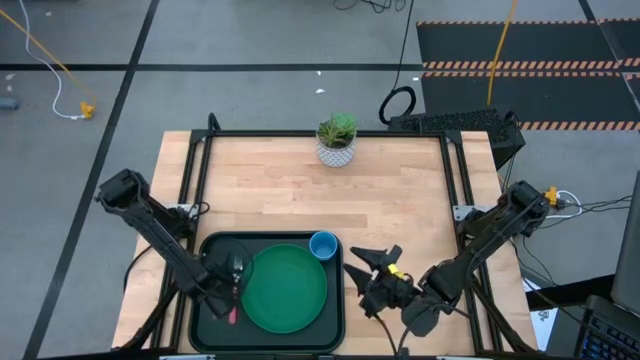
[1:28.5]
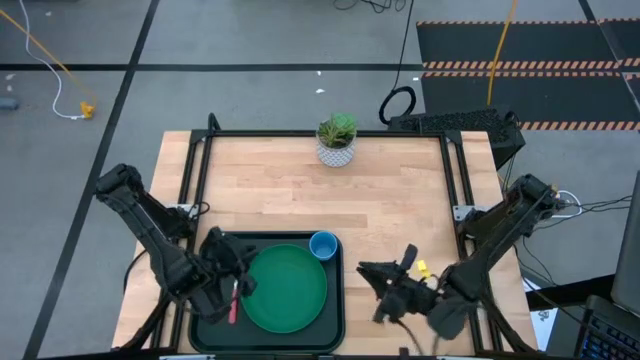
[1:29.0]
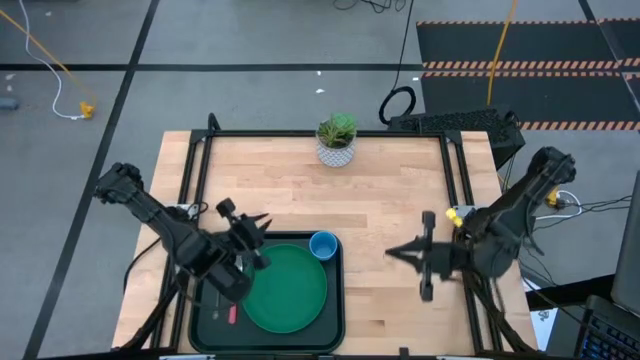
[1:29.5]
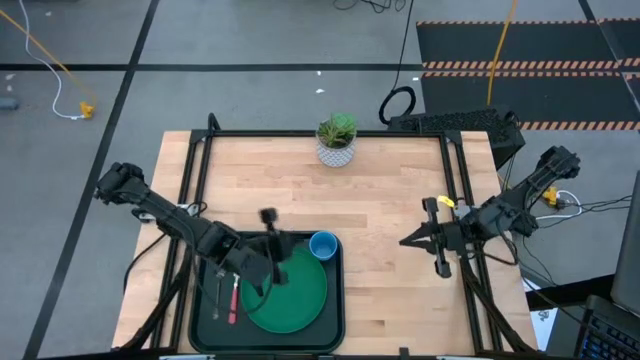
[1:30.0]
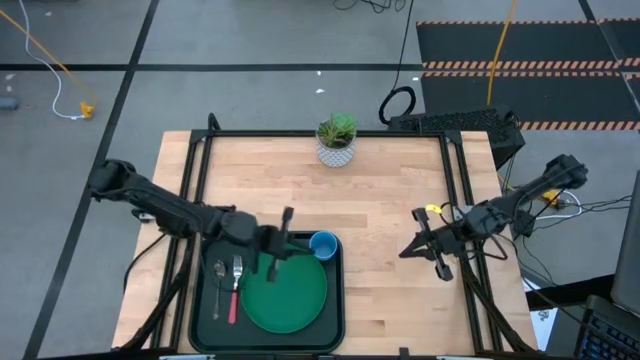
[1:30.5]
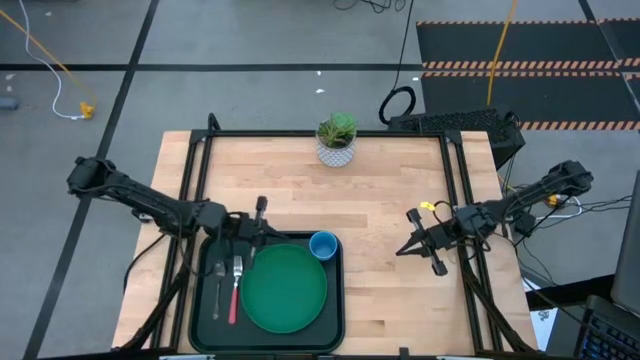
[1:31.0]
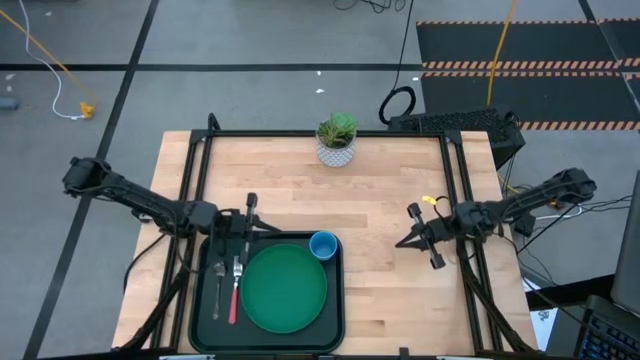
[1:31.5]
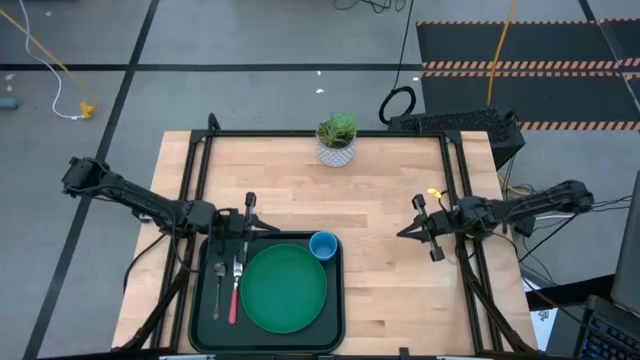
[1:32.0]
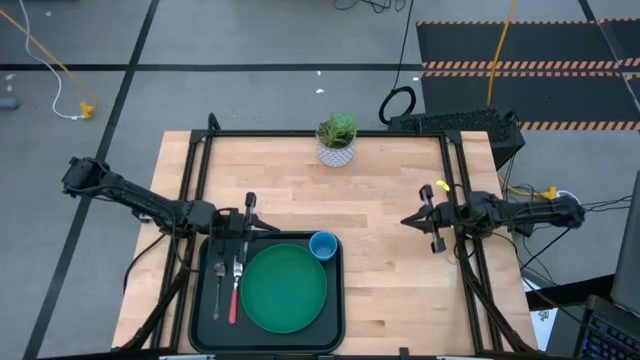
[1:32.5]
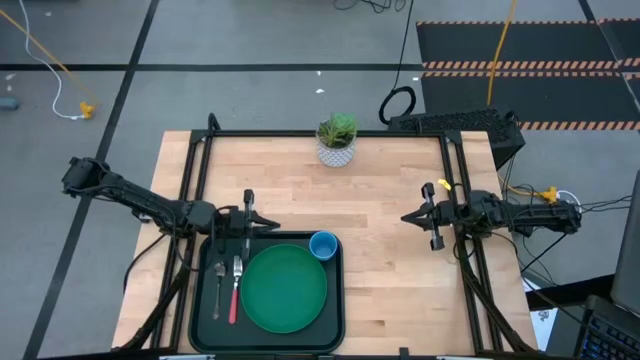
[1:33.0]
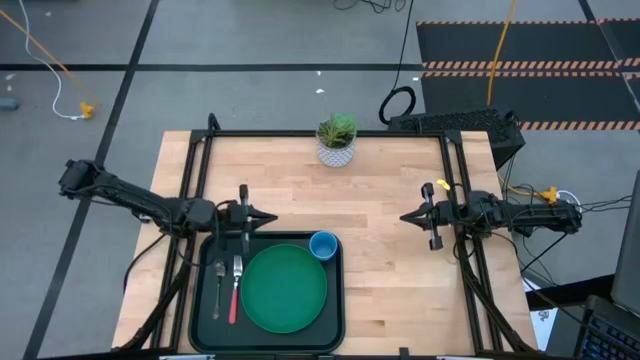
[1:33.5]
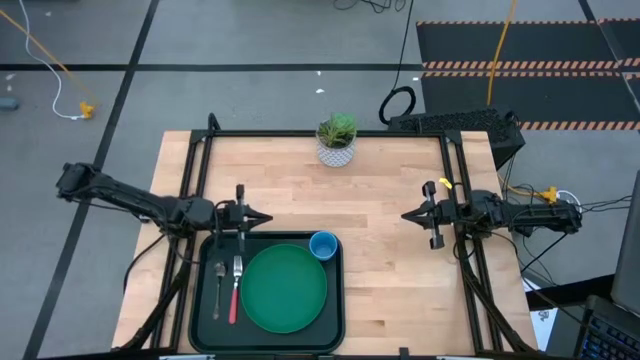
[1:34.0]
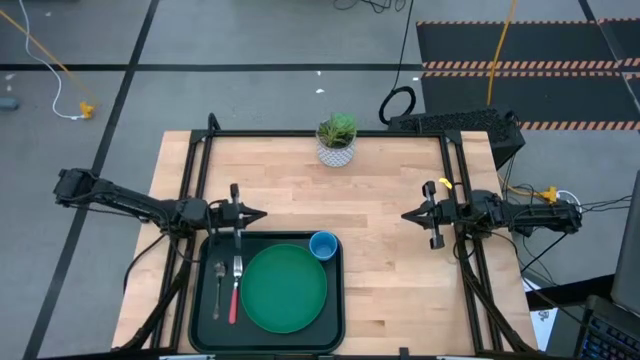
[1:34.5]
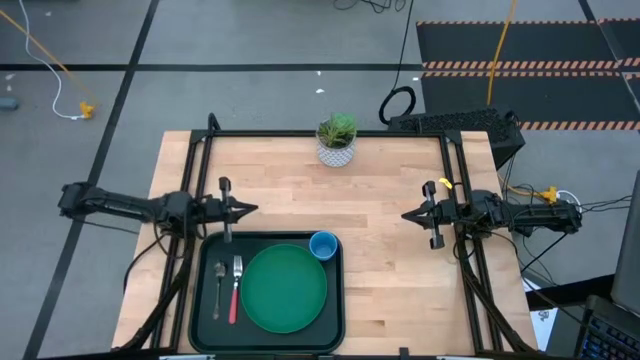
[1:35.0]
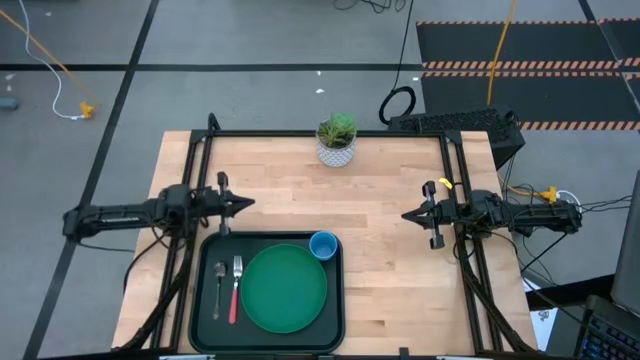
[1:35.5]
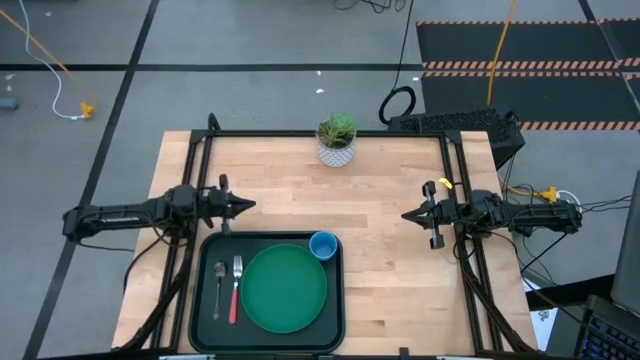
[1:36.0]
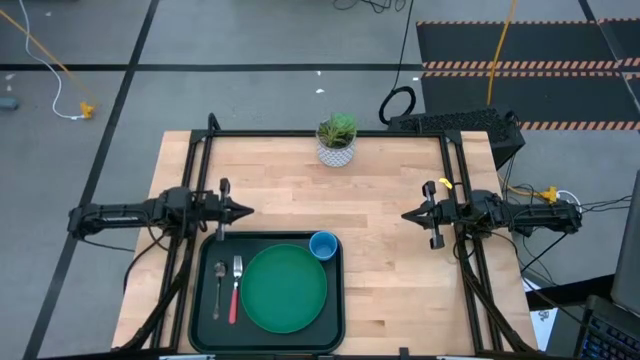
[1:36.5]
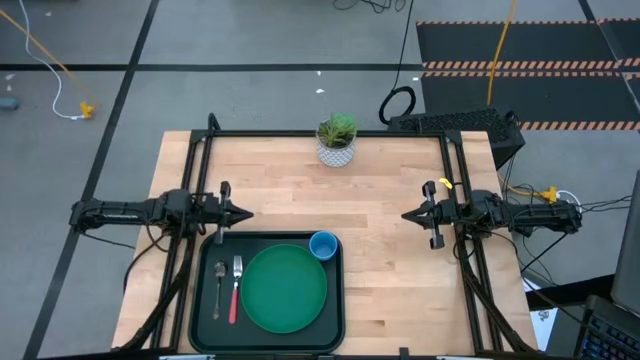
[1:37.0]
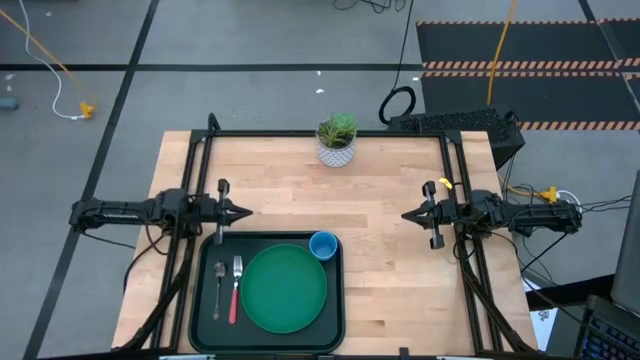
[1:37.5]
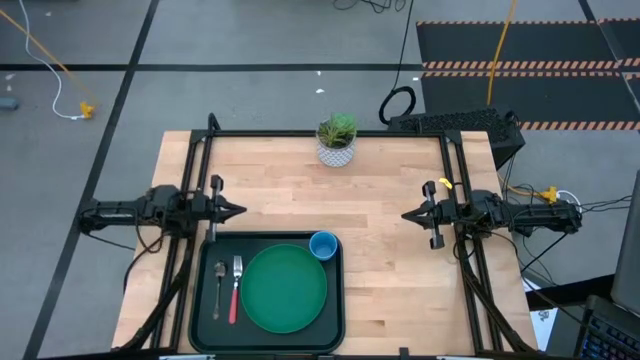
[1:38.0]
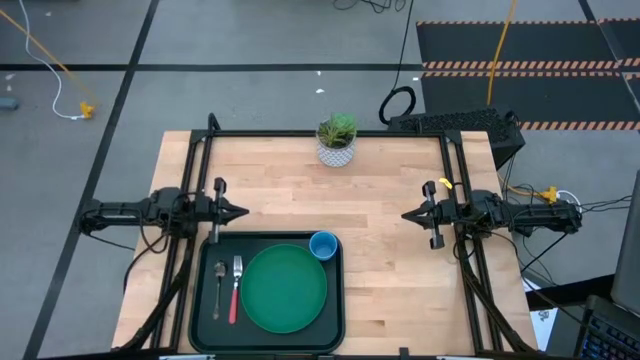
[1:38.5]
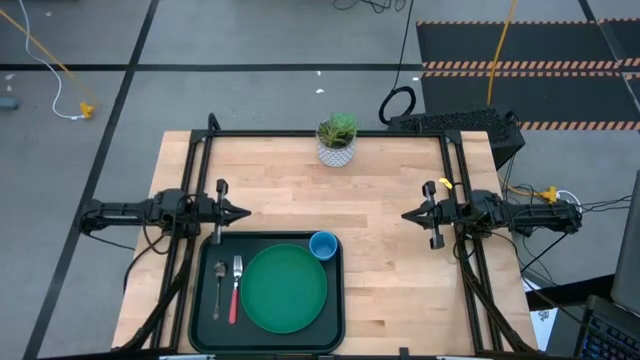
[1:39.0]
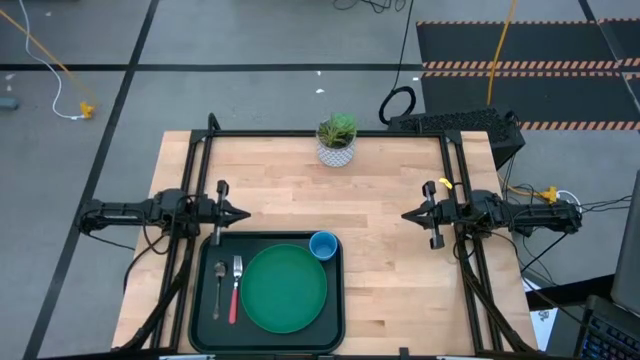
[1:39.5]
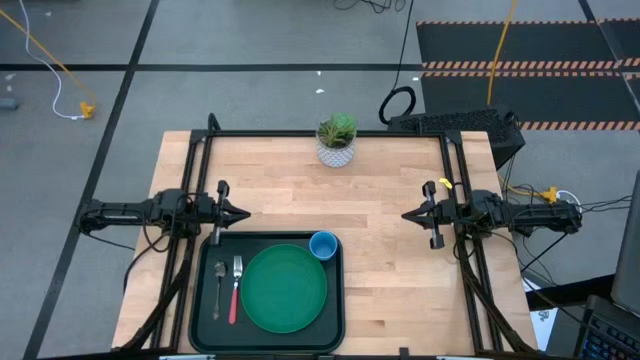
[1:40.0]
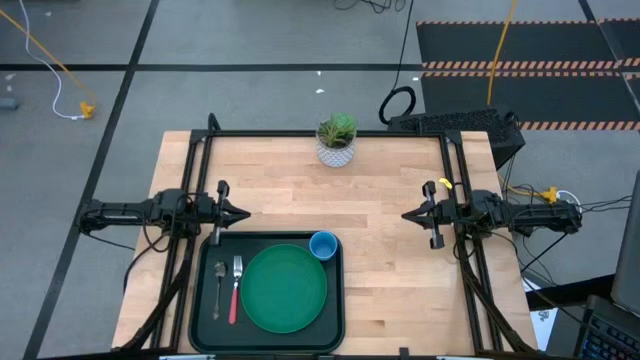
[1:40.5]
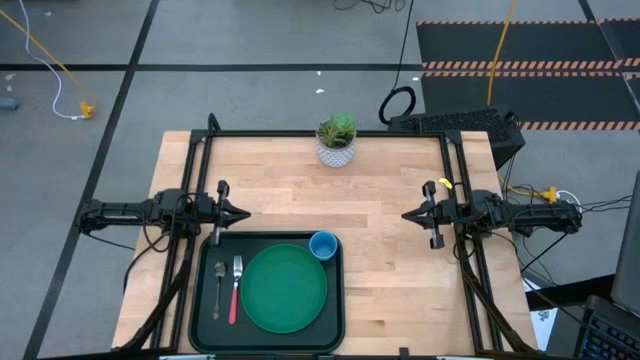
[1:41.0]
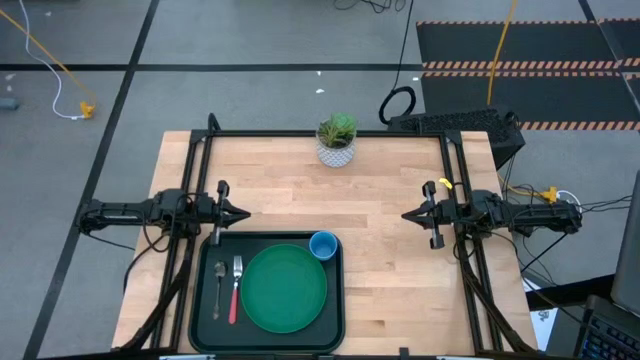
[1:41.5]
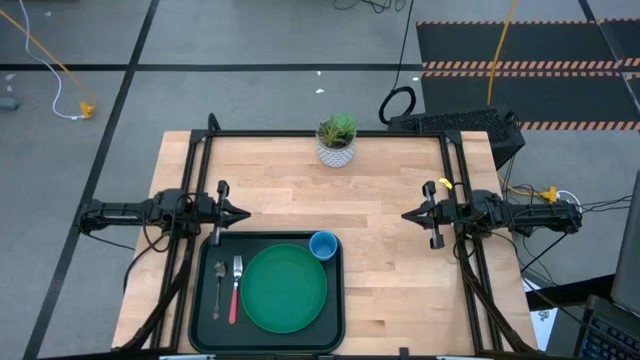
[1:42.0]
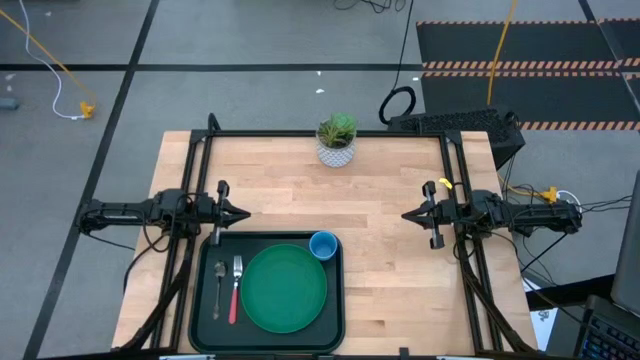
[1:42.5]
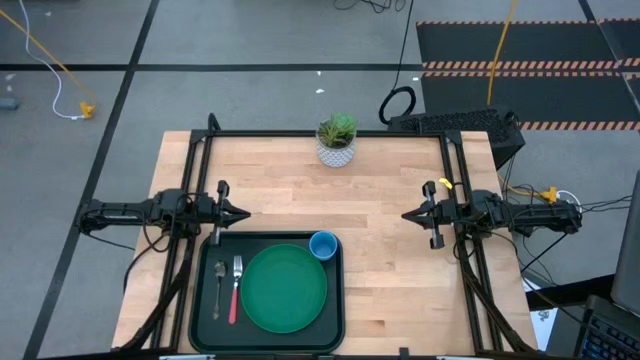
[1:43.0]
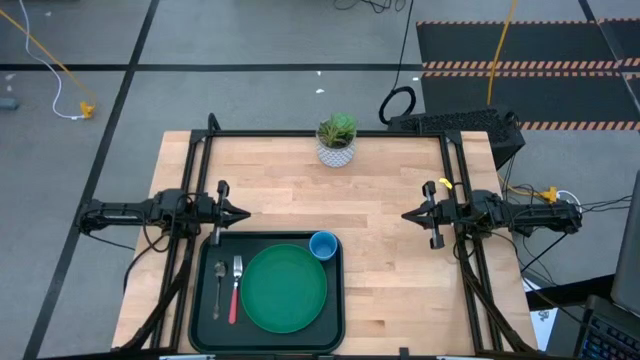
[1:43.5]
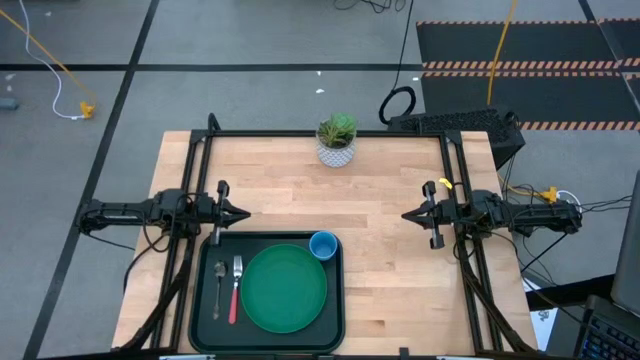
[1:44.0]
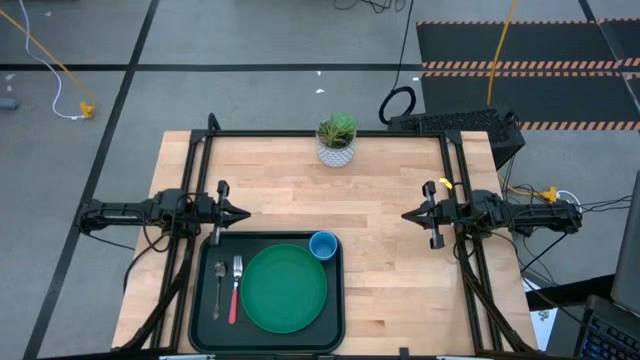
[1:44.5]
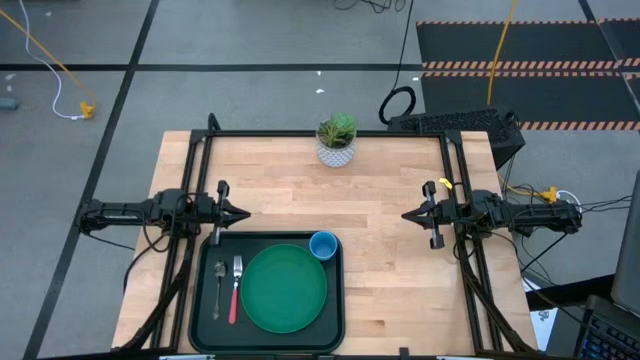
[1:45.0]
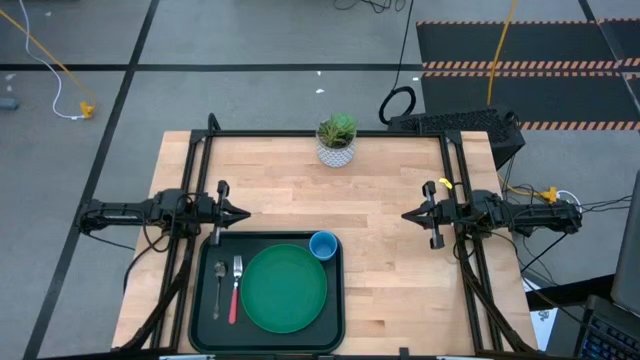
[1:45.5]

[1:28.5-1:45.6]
Task: Pick and place plate/cup/fork/spoon on tray
Return to Home Position

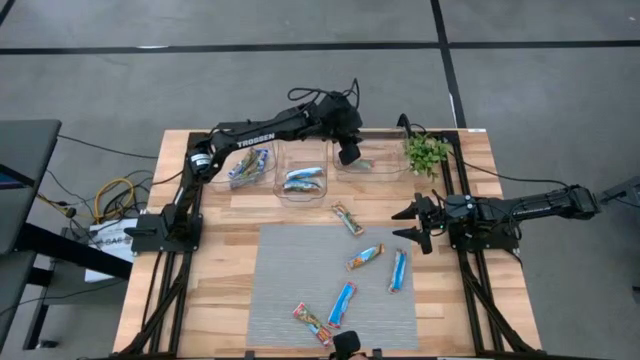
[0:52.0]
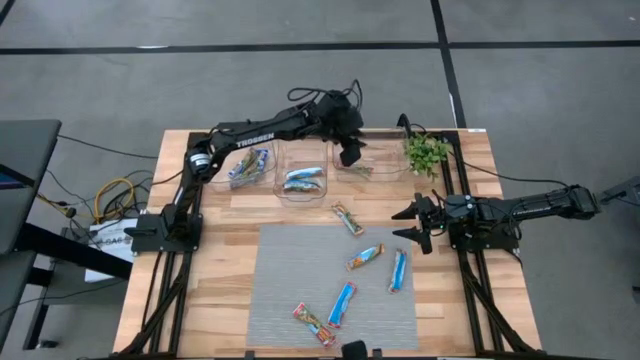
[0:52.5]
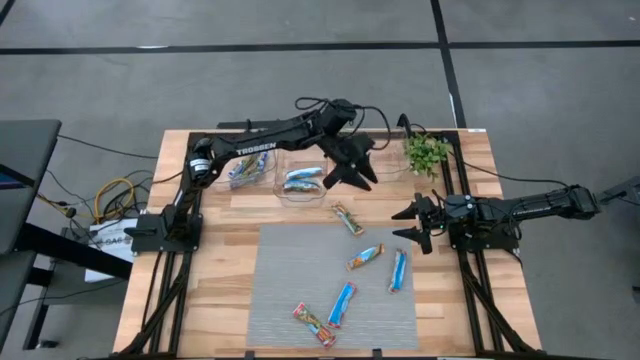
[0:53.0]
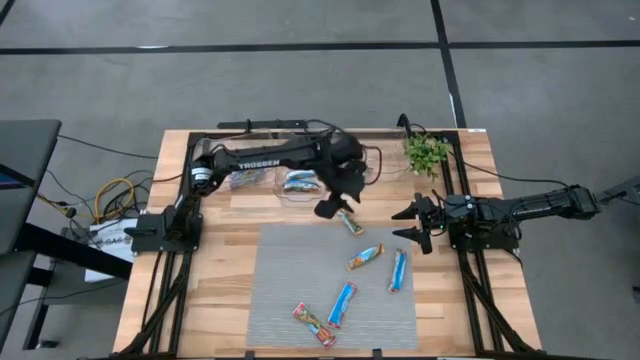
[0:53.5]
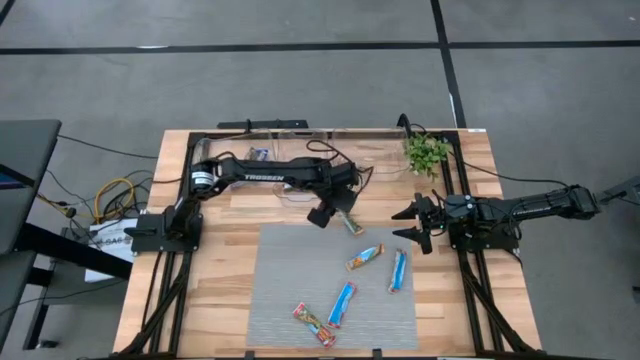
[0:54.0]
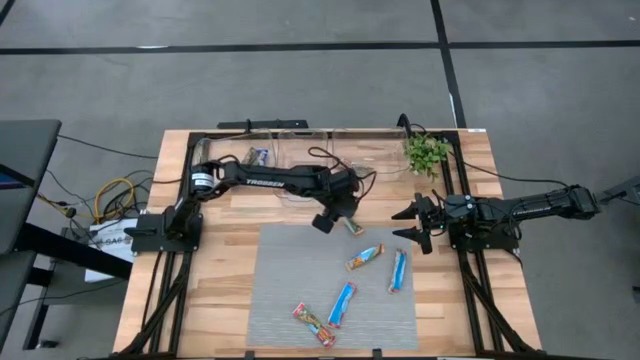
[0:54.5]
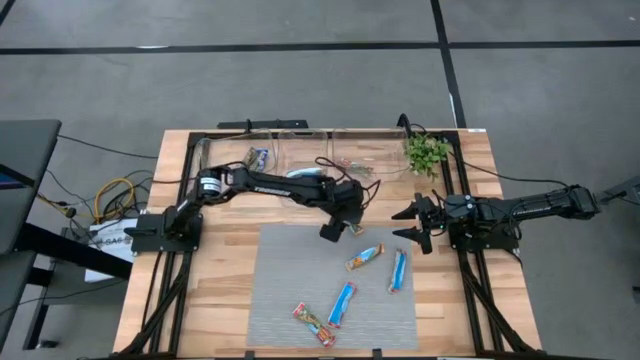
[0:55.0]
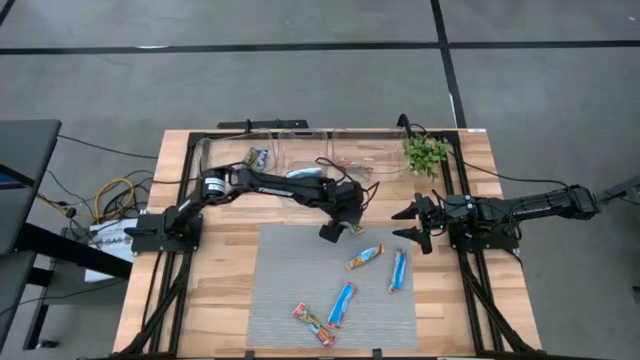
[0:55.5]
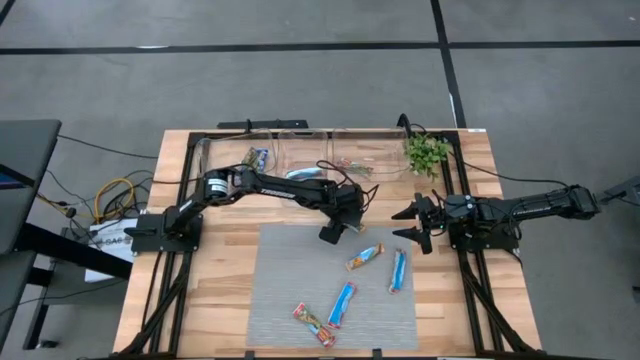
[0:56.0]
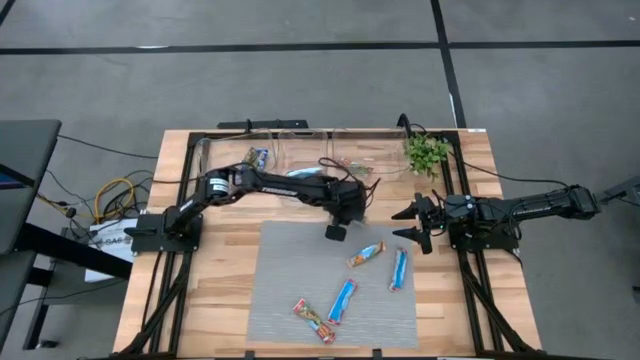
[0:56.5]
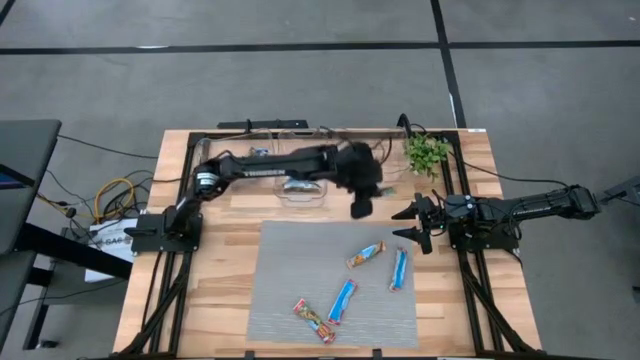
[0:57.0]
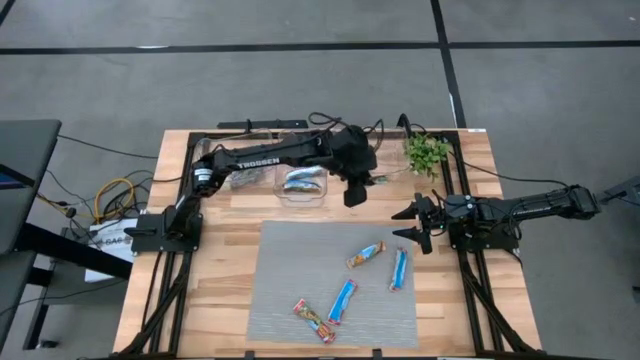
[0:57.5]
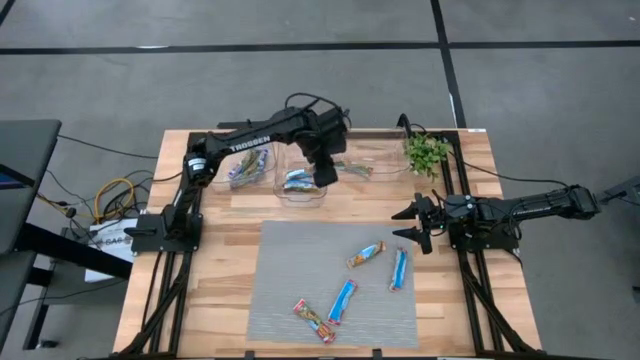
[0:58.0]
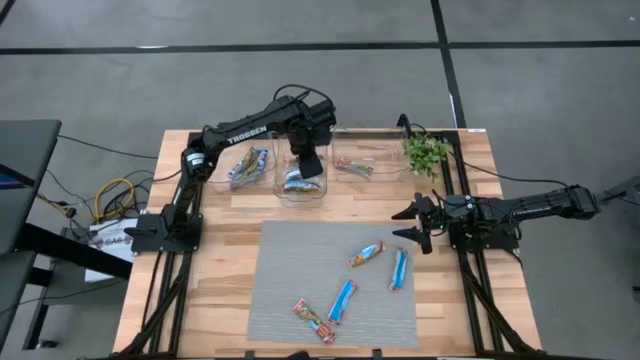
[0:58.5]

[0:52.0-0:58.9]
Task: Pick and place Granola Bars by type
Put the yellow granola bar into the center transparent bin
